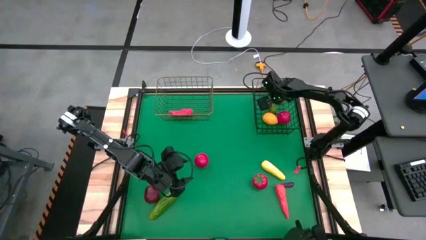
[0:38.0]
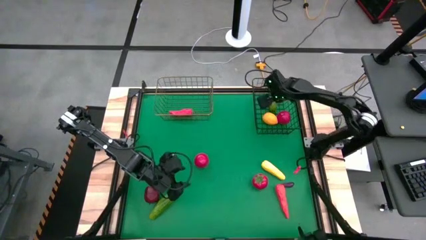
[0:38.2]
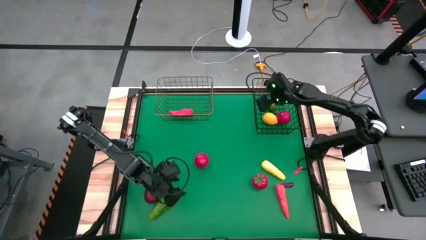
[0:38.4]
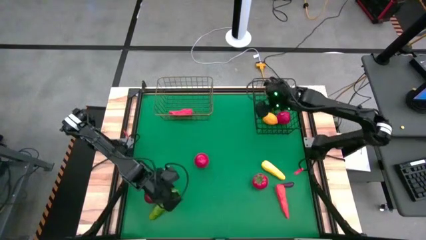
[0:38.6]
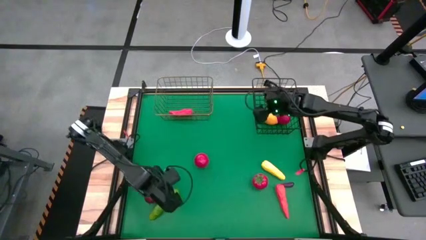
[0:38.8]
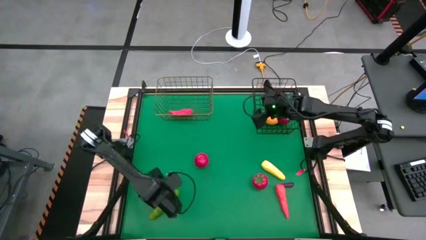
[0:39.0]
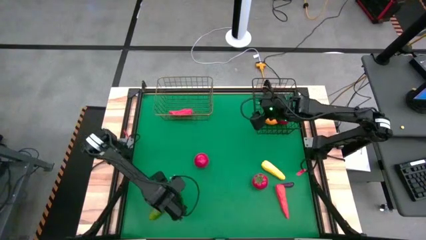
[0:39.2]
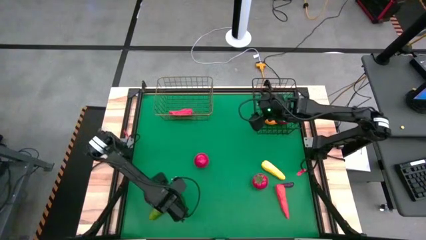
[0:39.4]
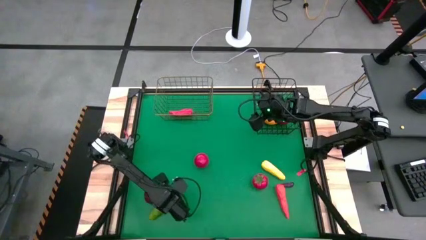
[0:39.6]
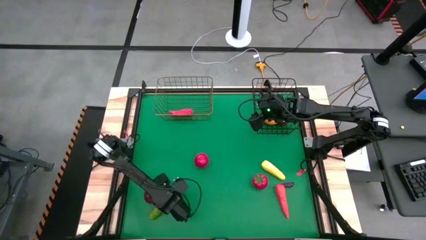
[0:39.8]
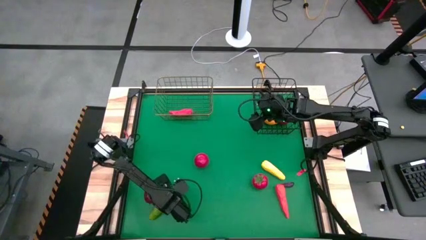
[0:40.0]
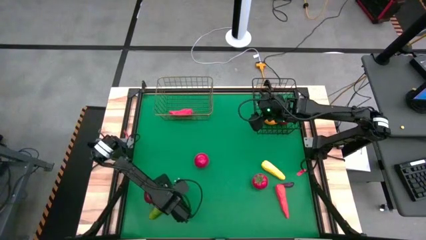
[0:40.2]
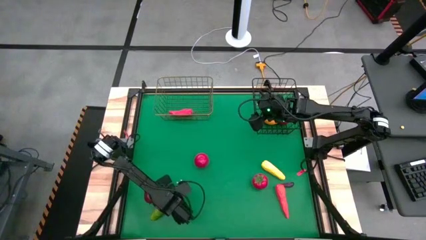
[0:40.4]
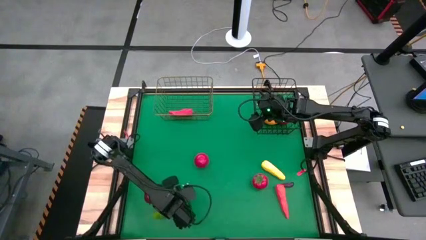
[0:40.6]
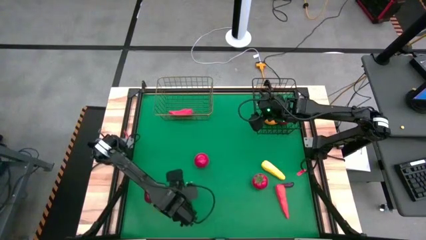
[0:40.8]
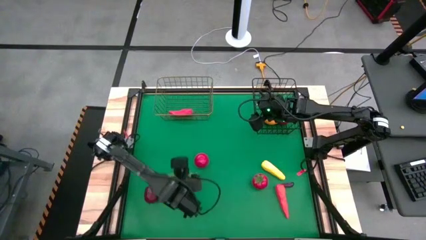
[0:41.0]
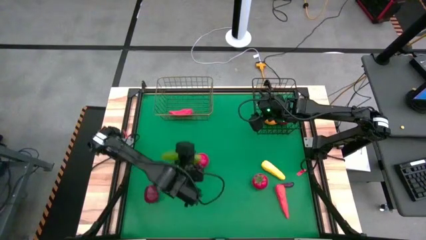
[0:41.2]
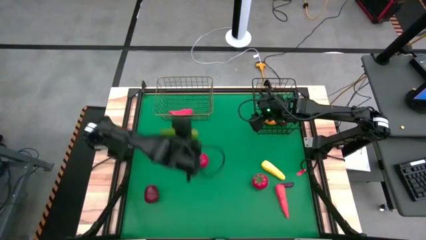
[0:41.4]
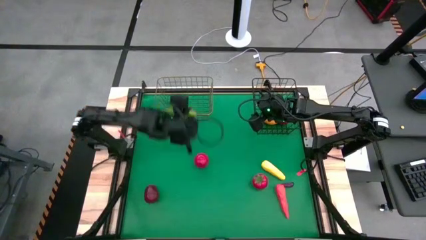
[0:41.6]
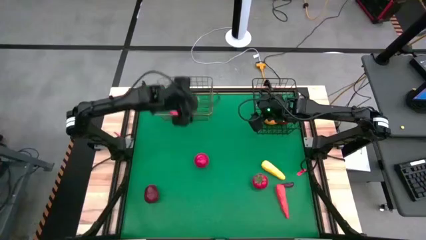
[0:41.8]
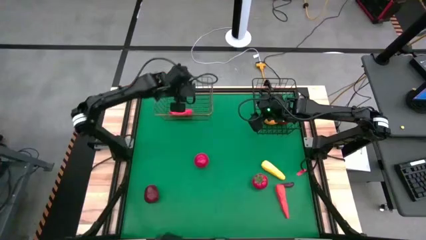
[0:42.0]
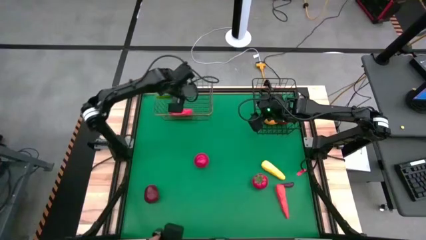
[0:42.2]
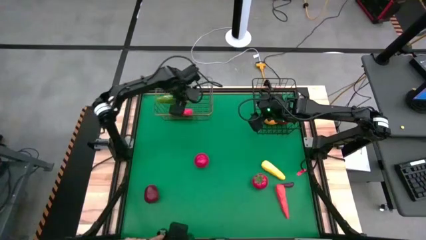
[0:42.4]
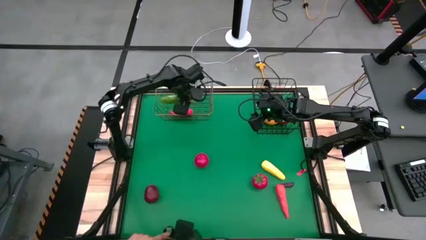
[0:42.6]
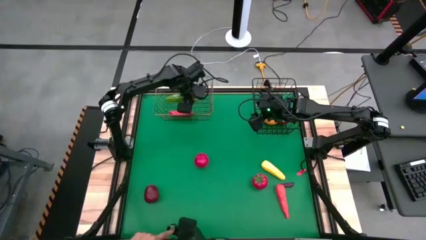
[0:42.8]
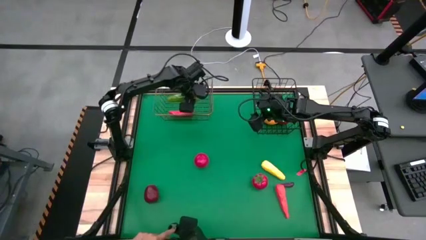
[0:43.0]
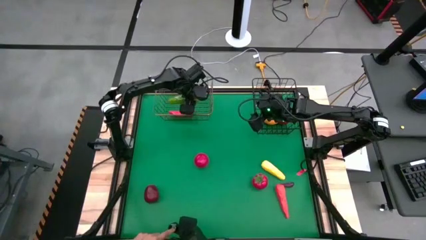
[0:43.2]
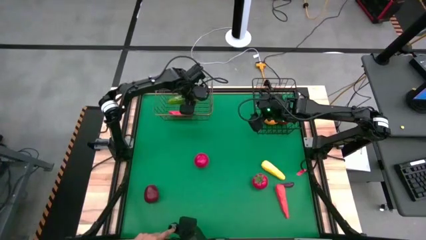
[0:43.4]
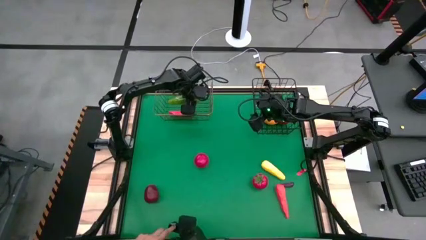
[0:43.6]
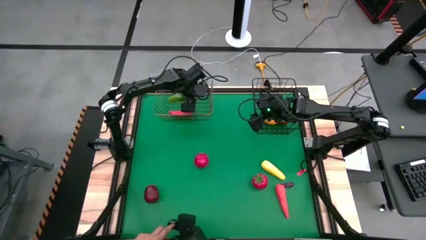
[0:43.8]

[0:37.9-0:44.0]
Task: Sort produce into baskets
Put the cucumber into the gold wire basket

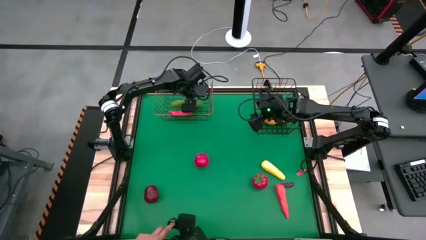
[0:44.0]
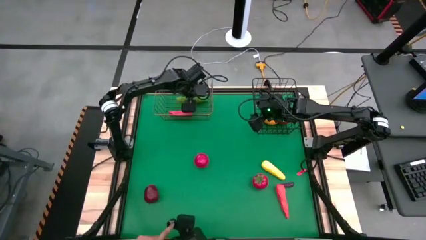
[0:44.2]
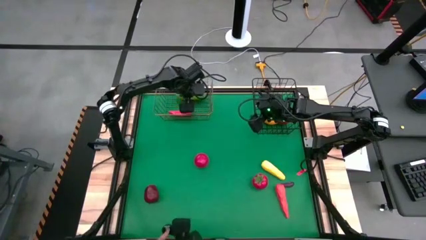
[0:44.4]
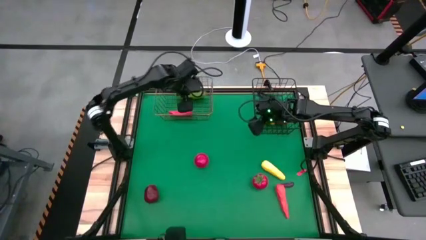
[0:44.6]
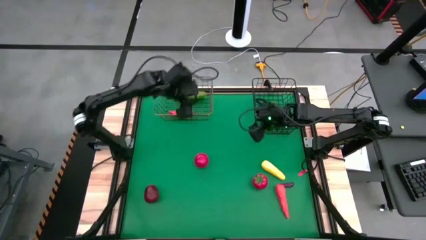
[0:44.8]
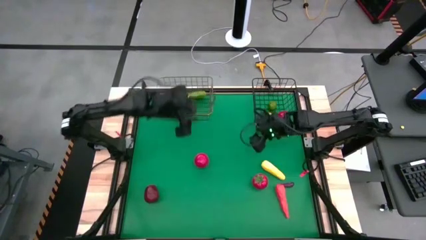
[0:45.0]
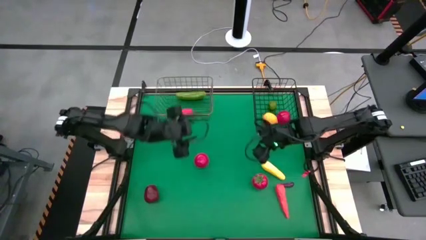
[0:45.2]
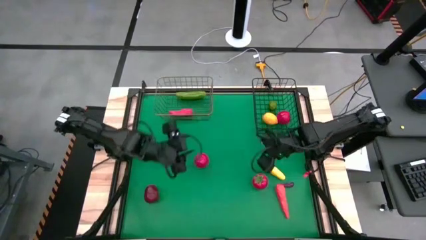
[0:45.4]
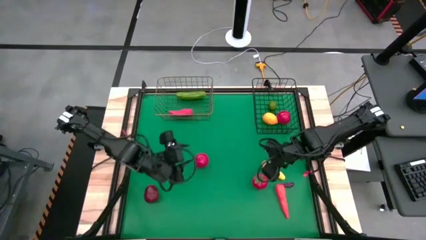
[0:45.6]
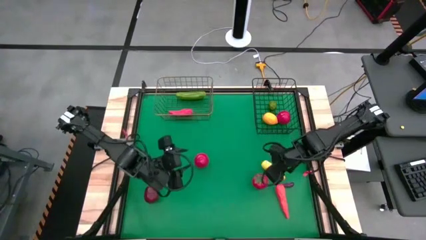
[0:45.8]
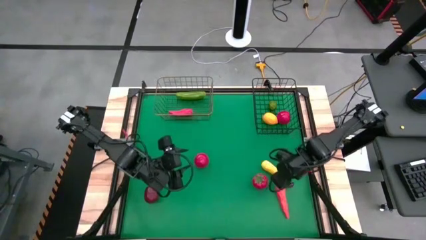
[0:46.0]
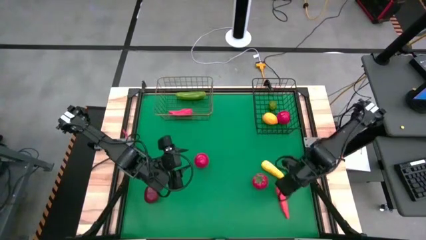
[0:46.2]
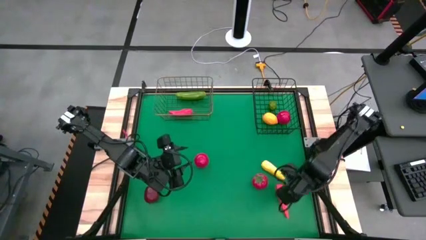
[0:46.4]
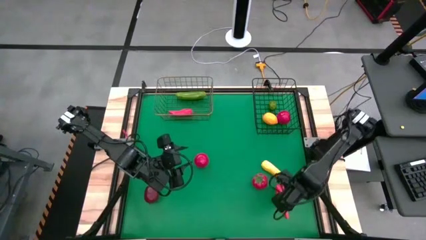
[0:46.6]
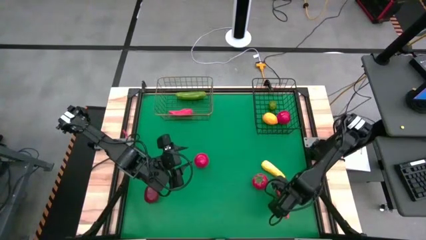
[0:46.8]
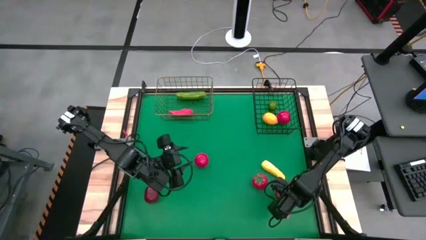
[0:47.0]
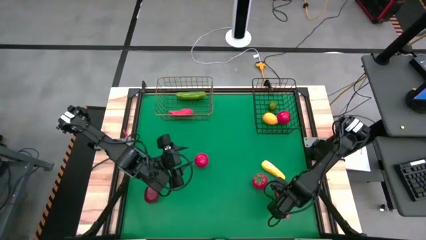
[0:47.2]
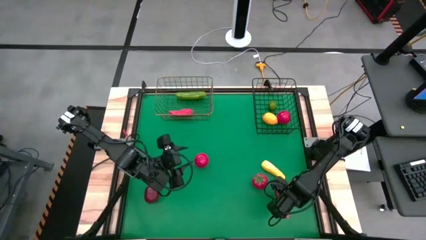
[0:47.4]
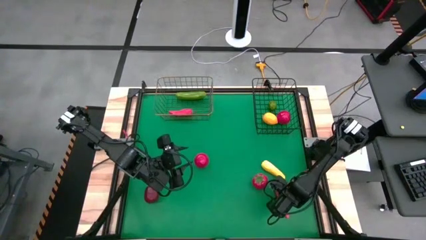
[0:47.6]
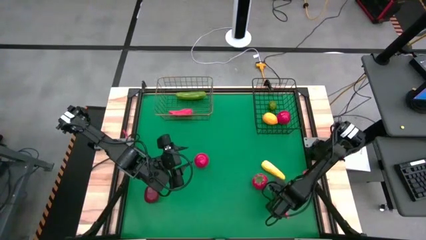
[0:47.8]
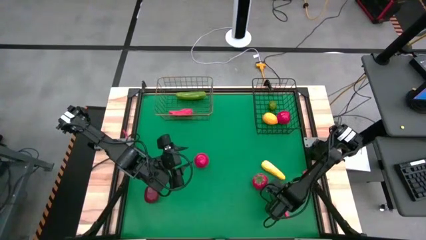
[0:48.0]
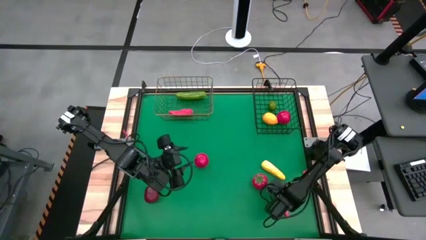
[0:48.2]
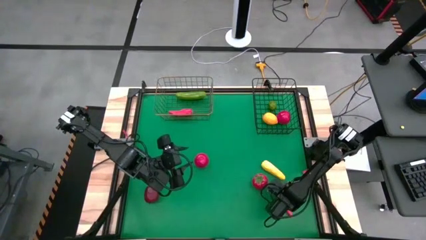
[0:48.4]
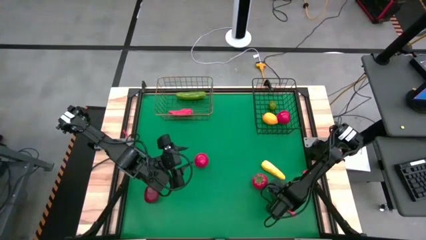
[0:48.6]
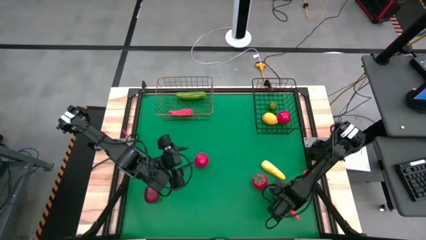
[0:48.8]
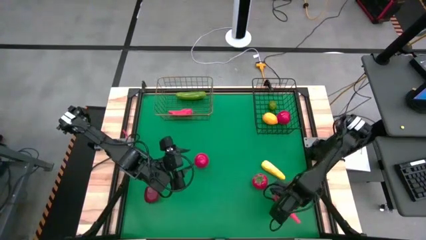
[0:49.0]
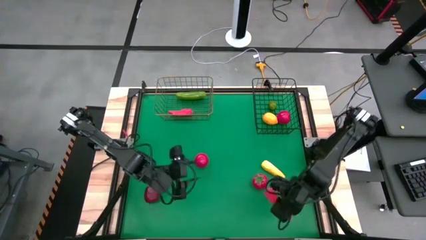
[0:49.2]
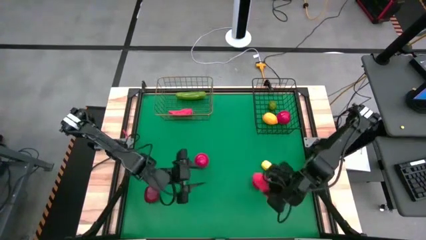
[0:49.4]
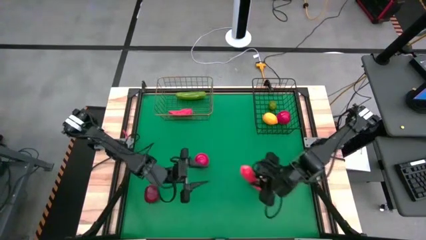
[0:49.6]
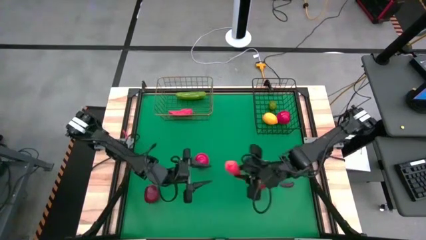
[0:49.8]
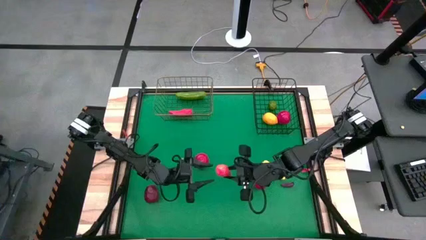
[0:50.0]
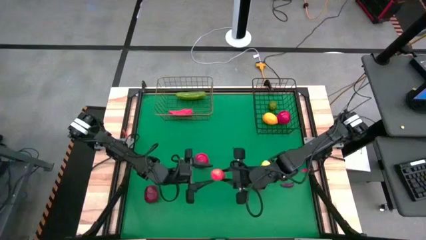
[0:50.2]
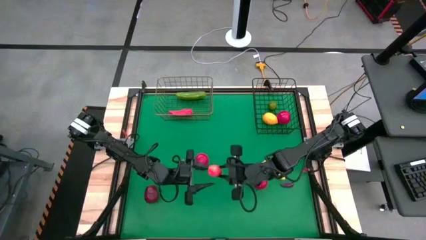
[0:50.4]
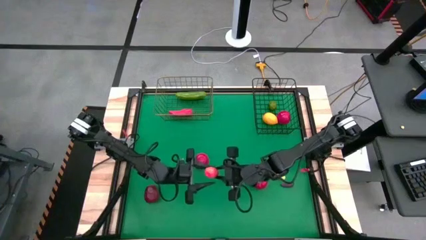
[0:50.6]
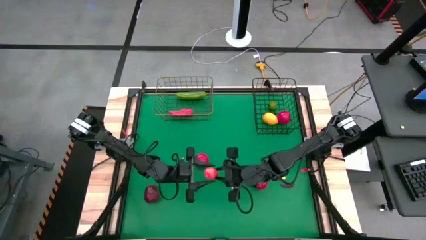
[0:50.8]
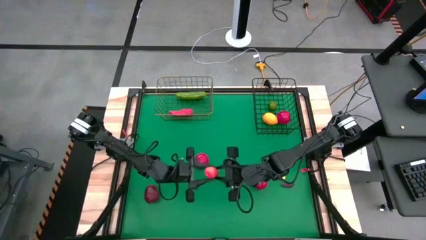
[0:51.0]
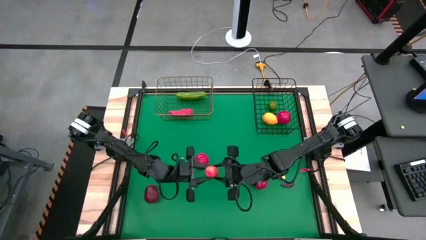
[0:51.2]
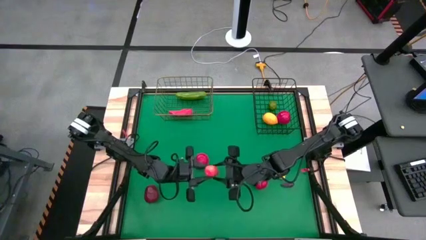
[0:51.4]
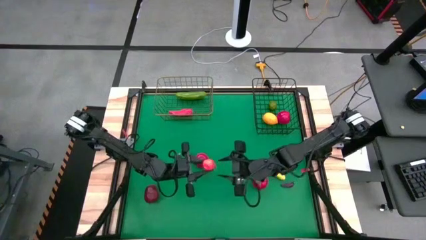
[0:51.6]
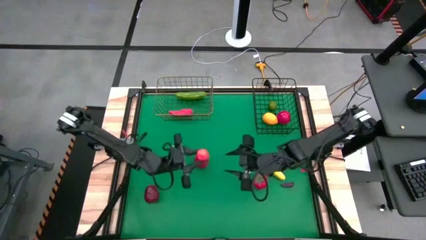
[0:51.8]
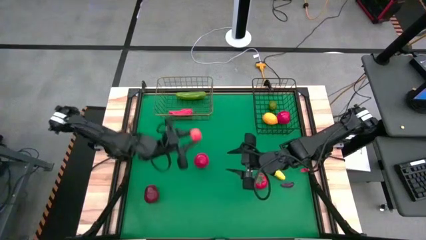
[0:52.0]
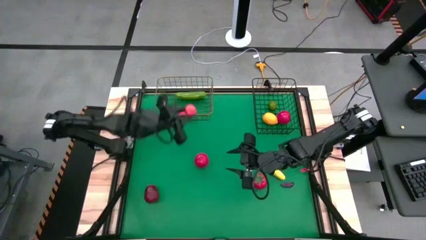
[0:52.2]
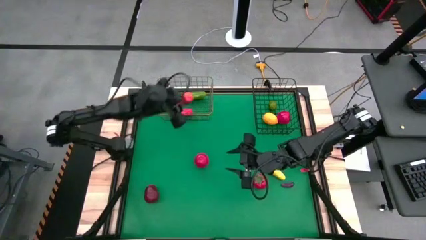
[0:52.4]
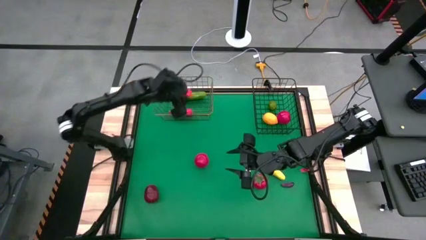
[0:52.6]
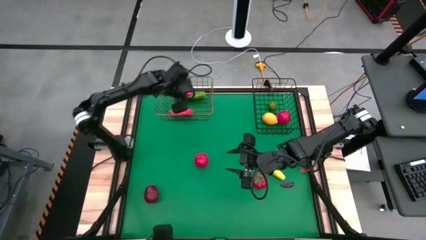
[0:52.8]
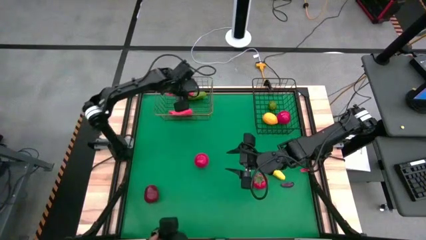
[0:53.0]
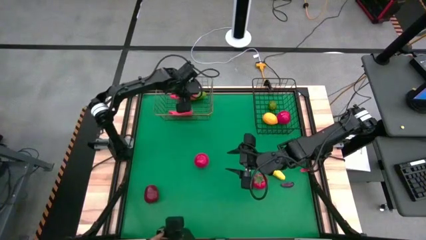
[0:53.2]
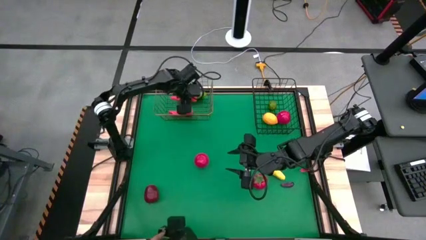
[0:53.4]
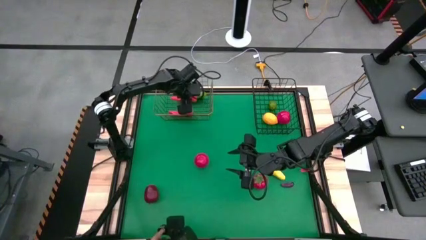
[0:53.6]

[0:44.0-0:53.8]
Put the orange carrot into the gold wire basket

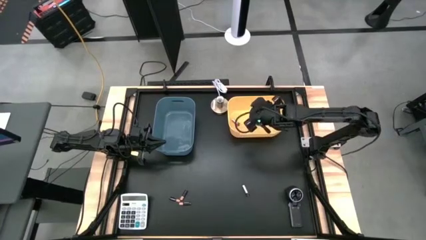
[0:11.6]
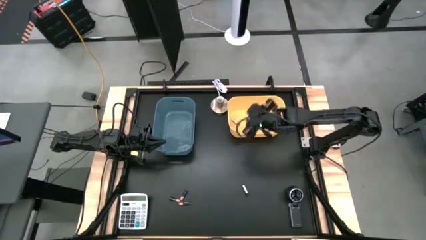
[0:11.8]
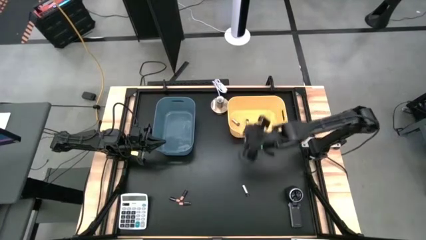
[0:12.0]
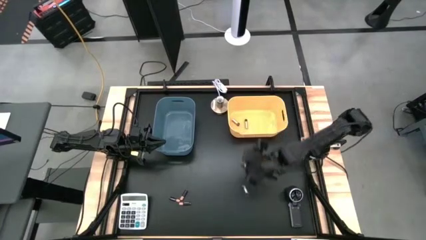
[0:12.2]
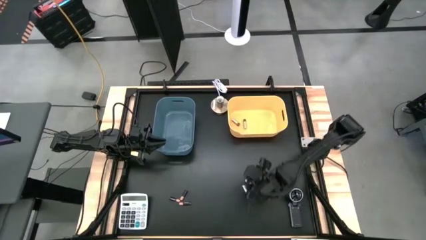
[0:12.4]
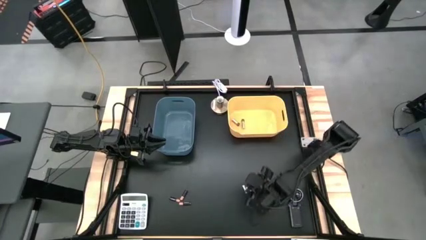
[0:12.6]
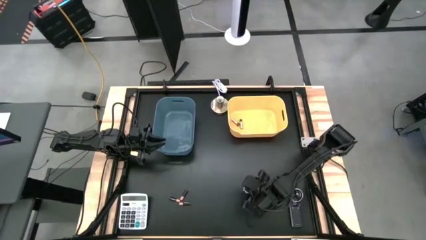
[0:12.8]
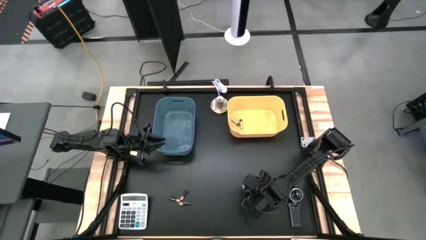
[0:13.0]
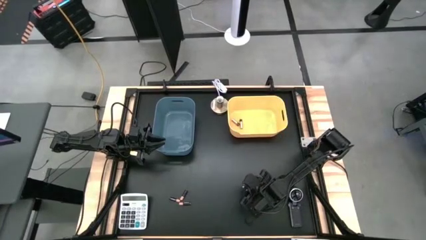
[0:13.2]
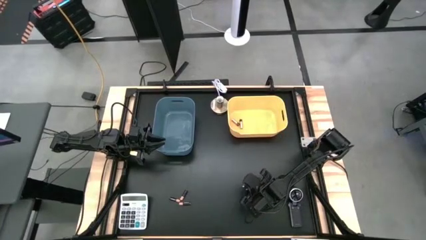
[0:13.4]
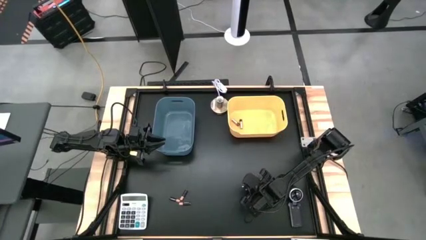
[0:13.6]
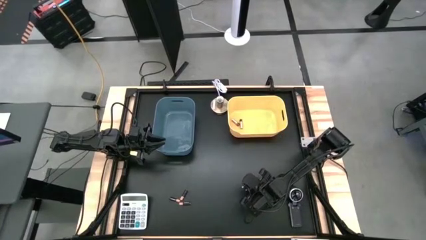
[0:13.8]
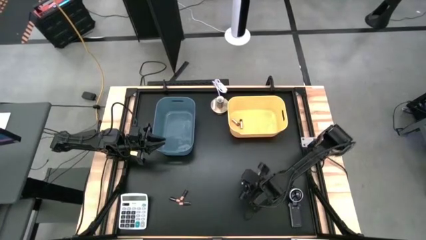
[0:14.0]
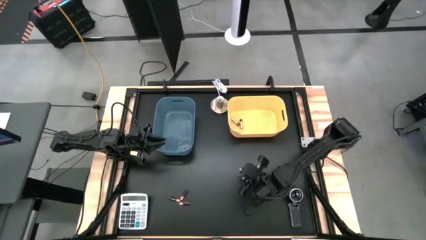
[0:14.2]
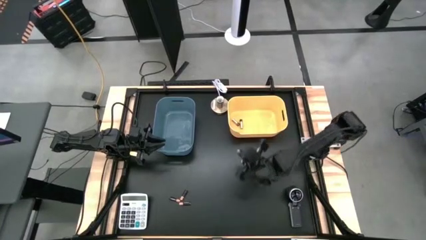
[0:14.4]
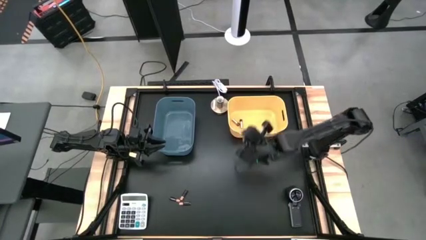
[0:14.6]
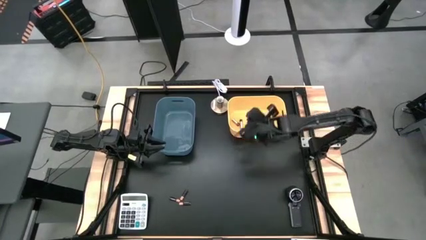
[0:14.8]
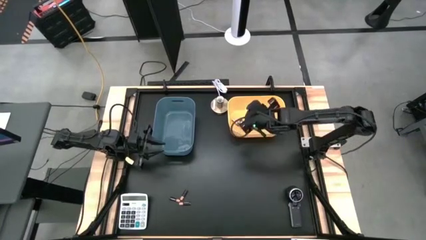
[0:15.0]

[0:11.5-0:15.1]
Task: Sort batteries
Put the silver battery into the yellow bin
